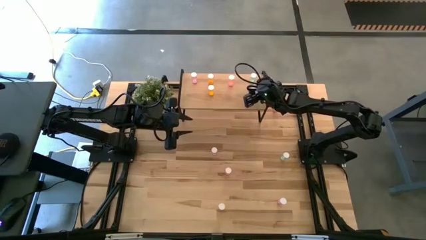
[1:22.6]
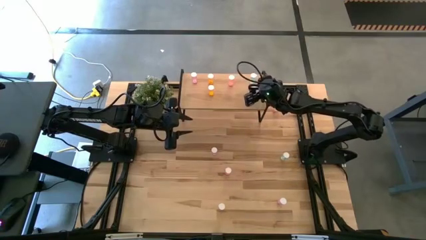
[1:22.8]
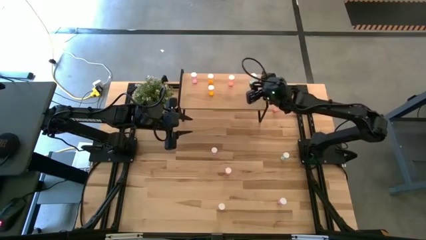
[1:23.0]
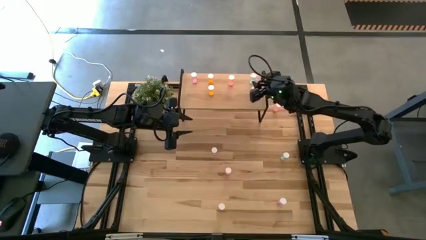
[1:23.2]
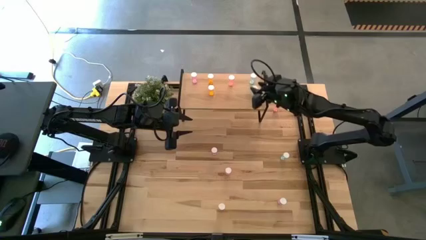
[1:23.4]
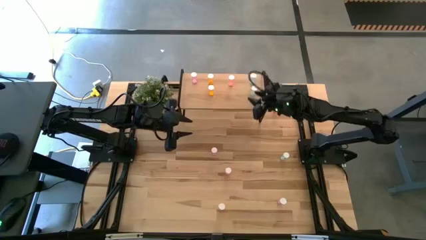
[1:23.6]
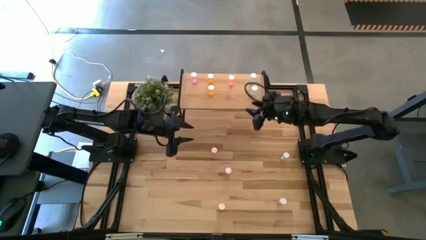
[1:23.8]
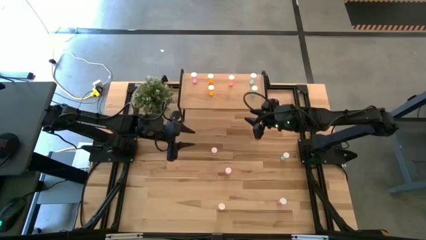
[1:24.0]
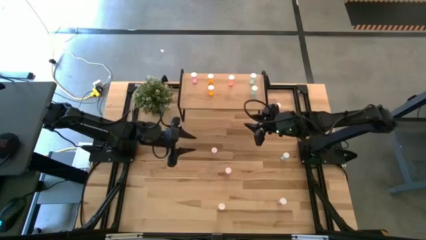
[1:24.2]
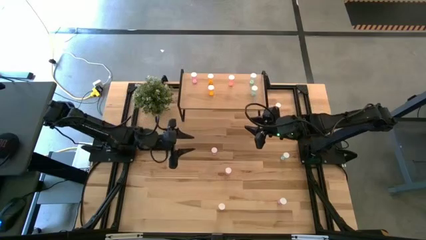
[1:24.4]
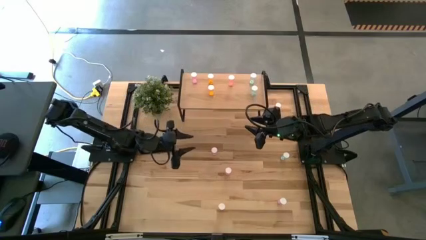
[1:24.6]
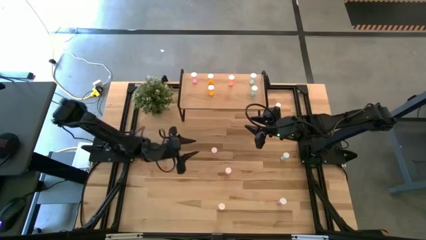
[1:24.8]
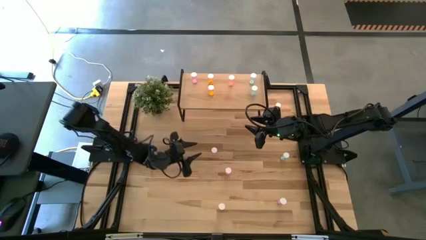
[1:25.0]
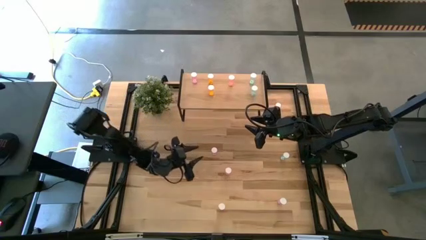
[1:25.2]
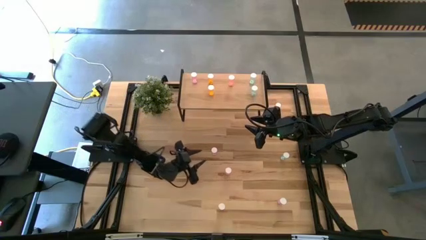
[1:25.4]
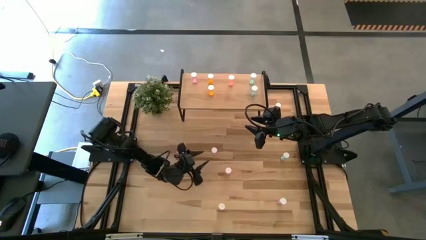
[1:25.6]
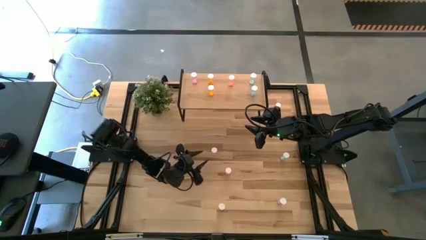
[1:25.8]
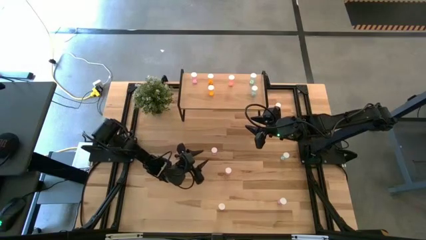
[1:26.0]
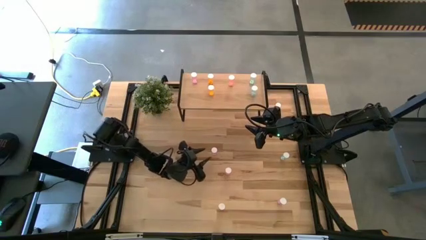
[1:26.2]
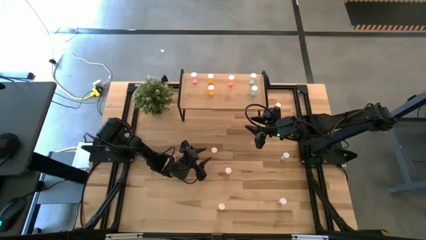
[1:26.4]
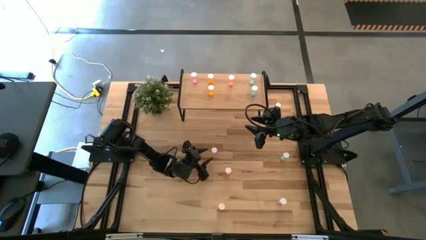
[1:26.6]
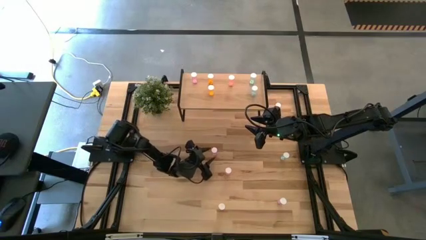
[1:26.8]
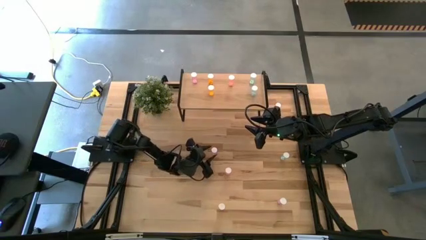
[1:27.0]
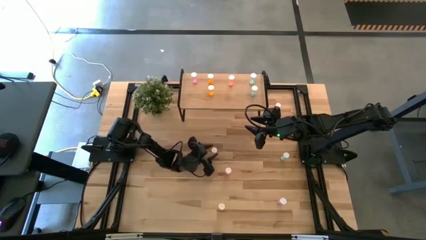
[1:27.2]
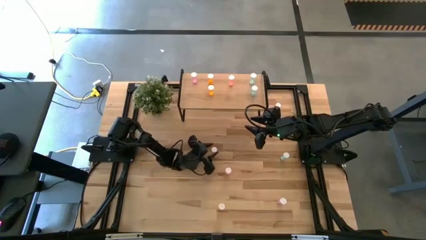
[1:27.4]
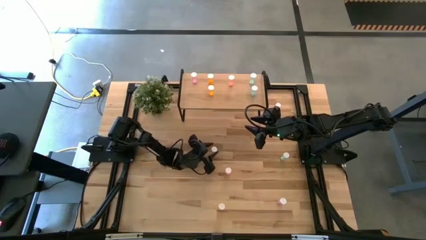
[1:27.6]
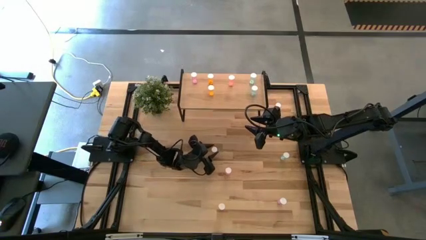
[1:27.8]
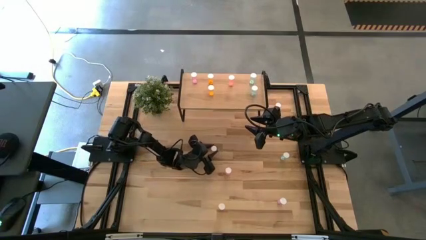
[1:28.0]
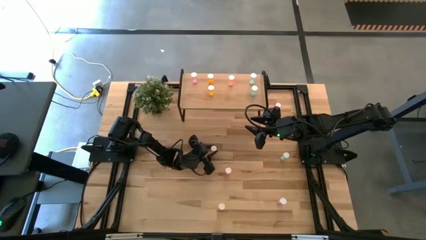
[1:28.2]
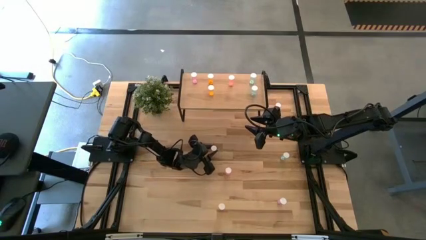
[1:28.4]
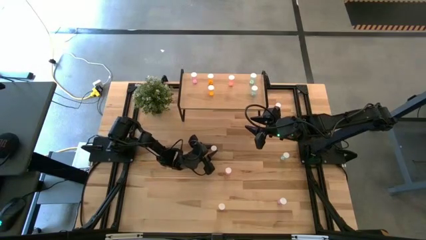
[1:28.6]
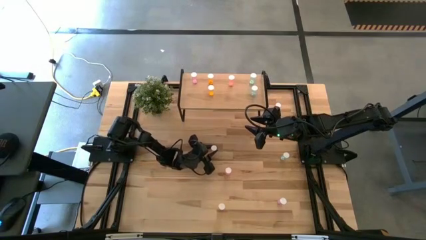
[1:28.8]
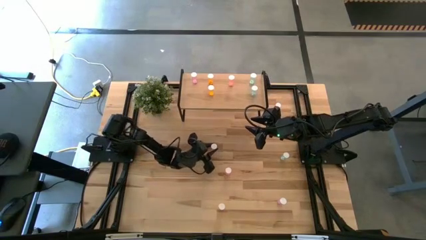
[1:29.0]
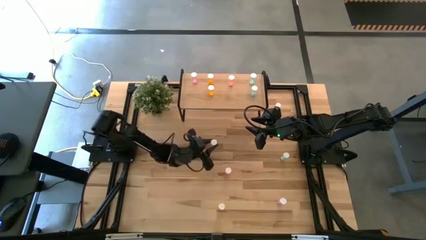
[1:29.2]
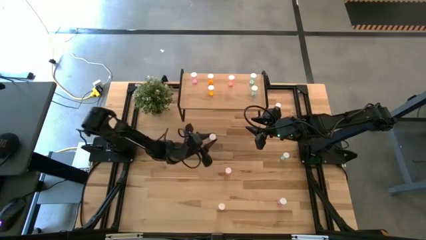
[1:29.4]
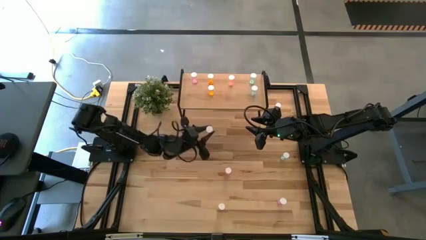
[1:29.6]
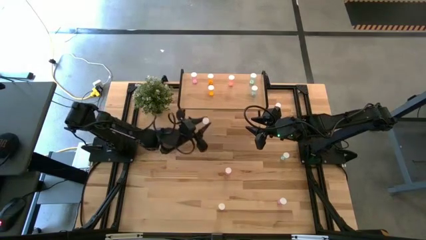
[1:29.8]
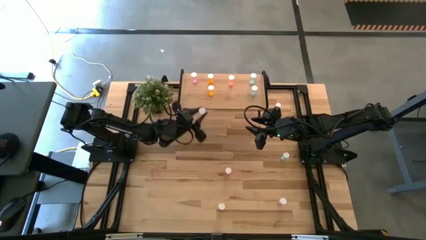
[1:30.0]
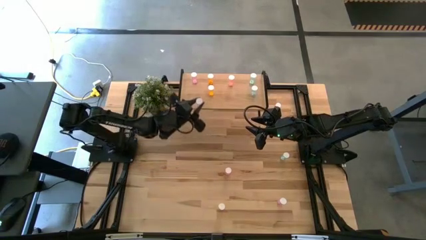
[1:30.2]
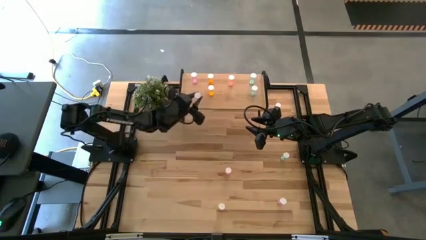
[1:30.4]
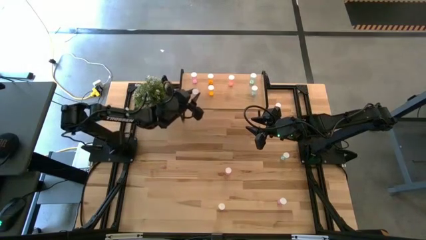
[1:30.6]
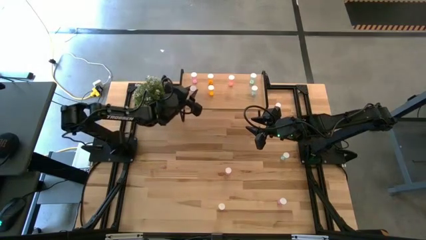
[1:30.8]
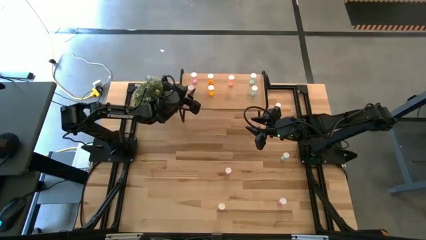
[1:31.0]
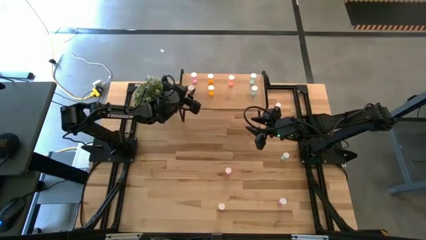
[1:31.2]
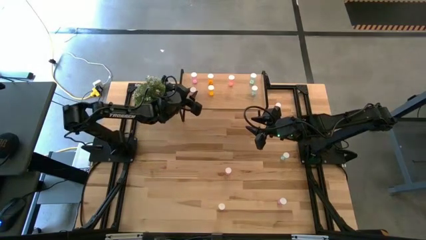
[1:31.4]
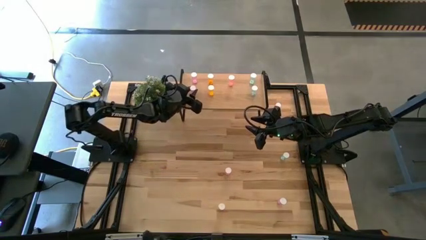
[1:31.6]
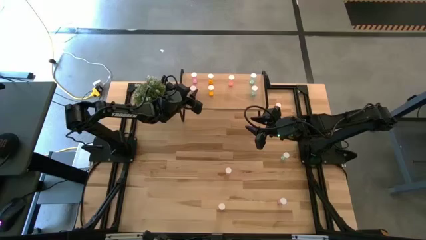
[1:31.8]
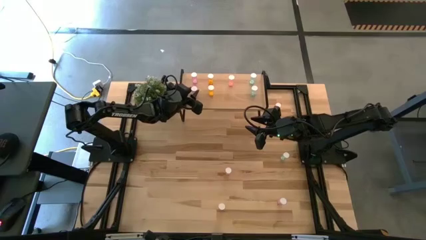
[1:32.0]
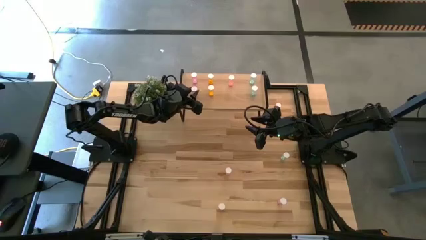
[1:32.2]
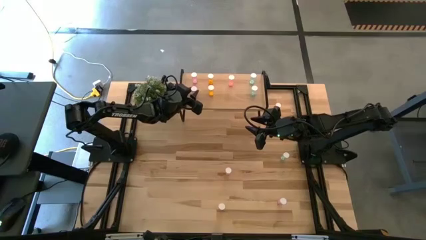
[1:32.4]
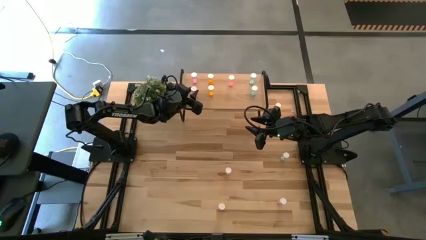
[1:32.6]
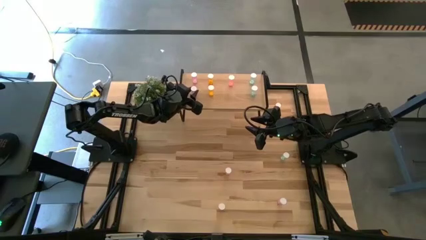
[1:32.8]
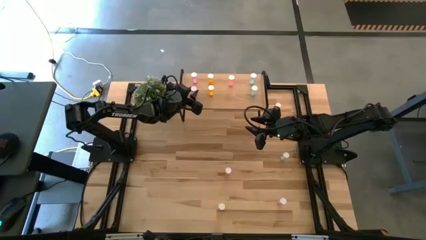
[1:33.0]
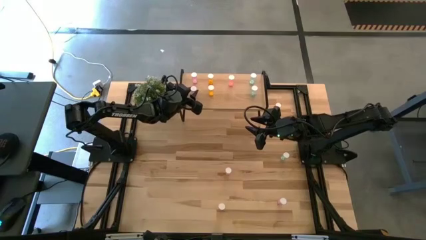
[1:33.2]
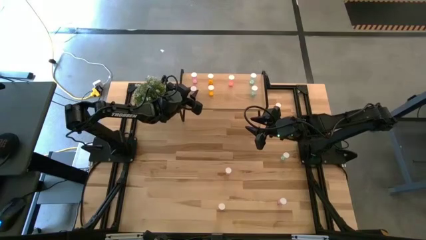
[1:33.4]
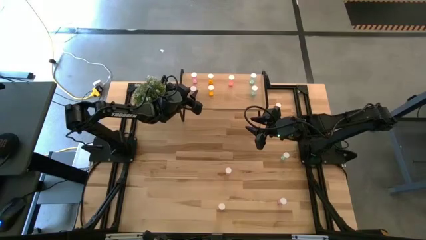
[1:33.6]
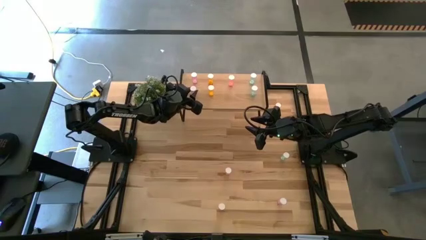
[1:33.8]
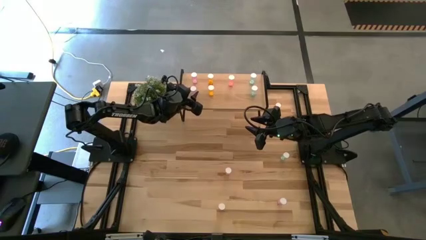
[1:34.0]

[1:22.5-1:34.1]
Task: Pick and place medicine bottles onto shelf by color
Put the top violet pill bottle aligned with the other violet pill bottle on the shelf
